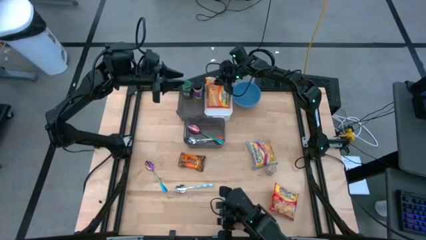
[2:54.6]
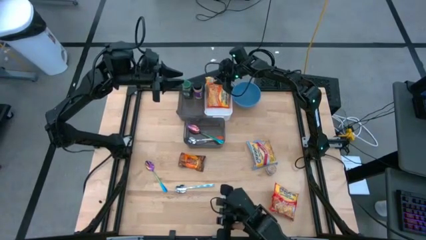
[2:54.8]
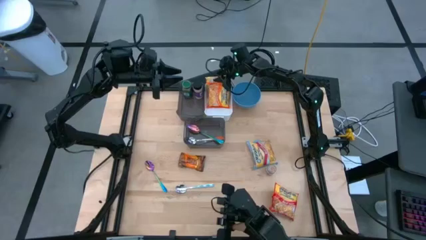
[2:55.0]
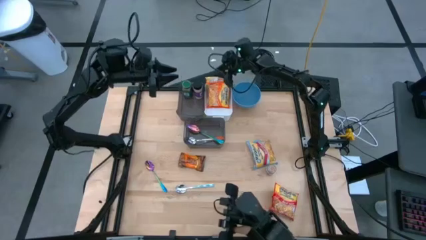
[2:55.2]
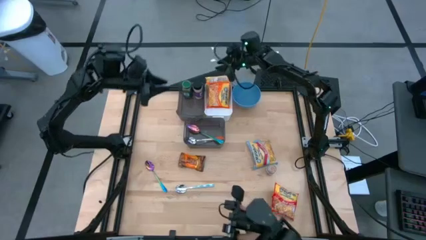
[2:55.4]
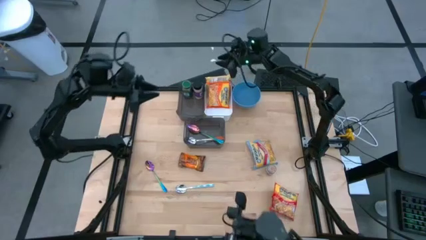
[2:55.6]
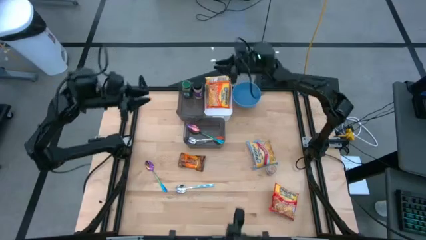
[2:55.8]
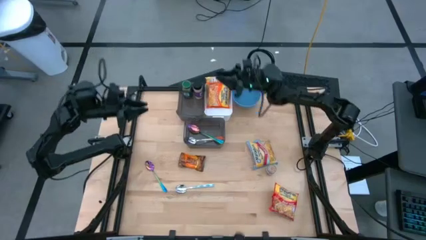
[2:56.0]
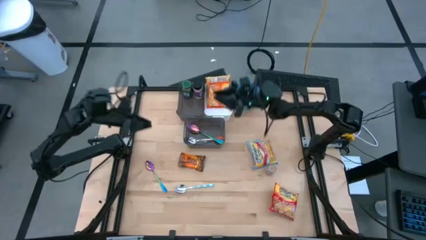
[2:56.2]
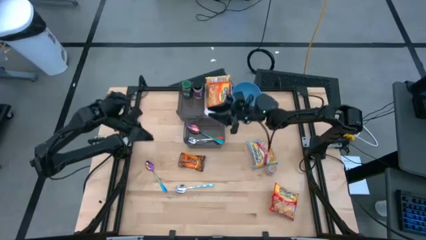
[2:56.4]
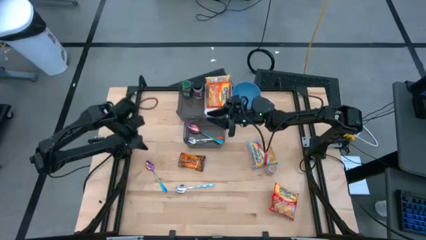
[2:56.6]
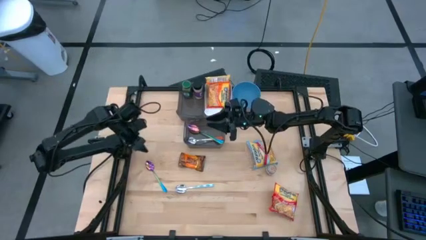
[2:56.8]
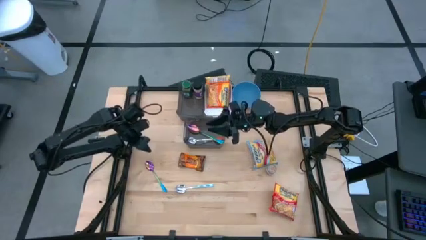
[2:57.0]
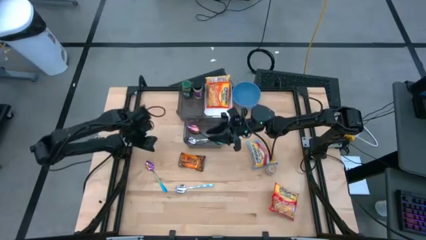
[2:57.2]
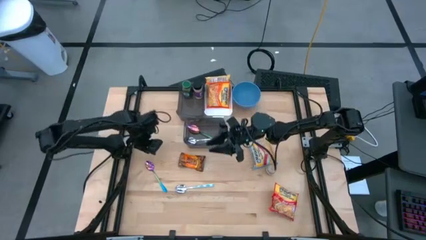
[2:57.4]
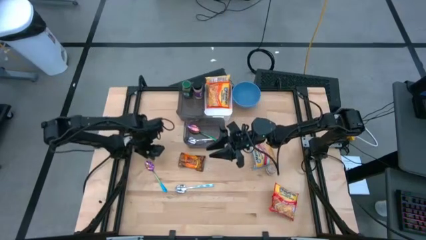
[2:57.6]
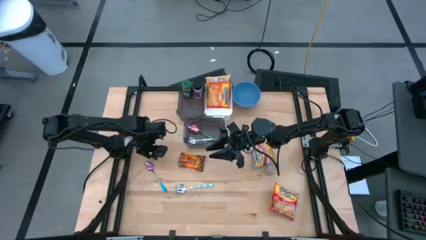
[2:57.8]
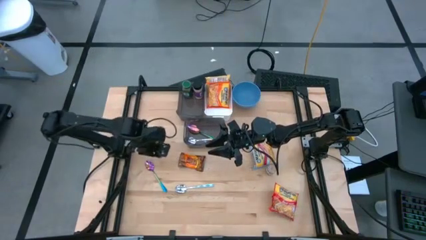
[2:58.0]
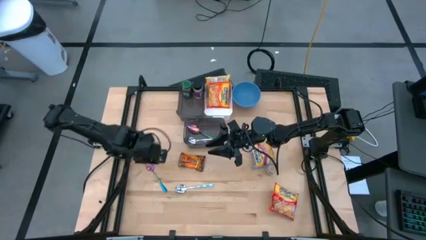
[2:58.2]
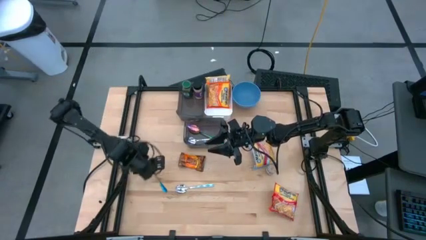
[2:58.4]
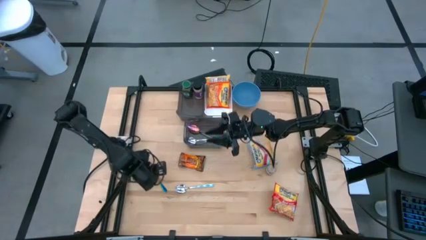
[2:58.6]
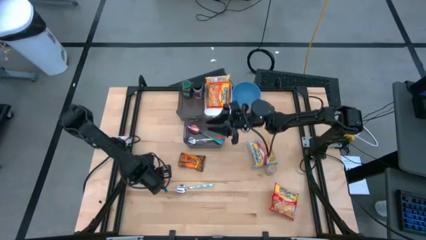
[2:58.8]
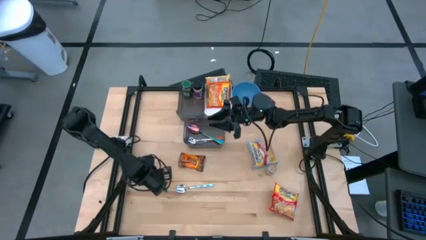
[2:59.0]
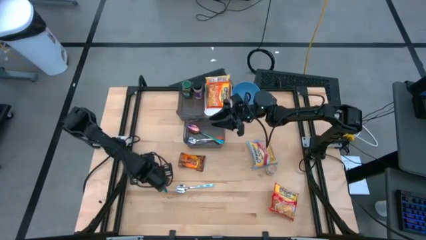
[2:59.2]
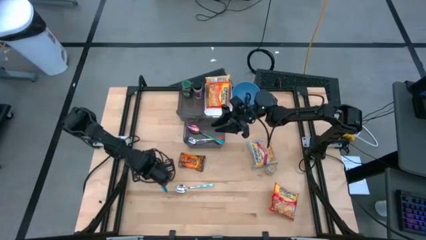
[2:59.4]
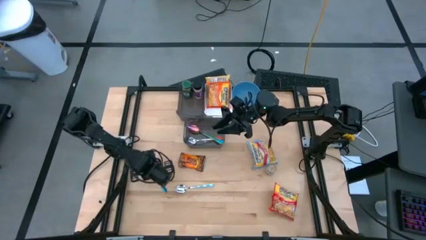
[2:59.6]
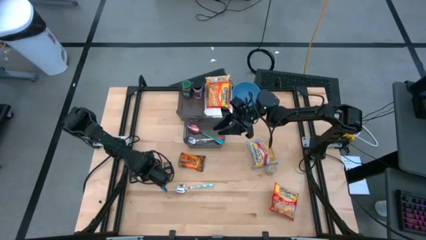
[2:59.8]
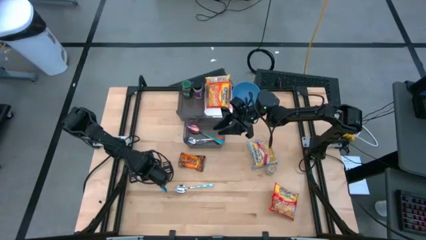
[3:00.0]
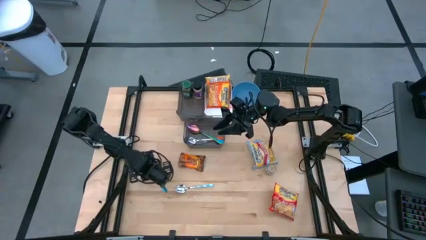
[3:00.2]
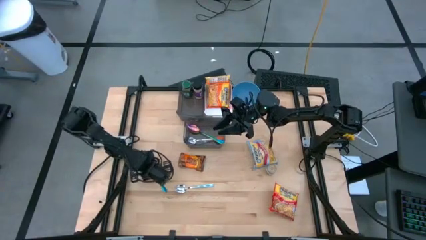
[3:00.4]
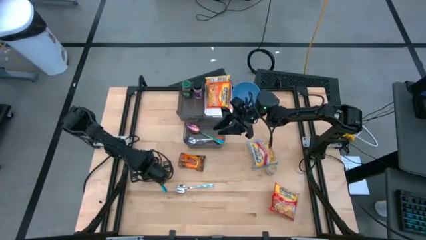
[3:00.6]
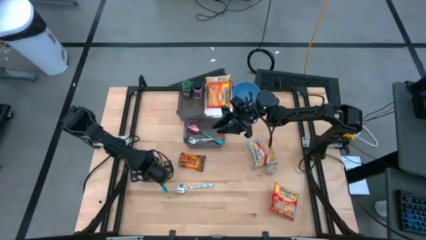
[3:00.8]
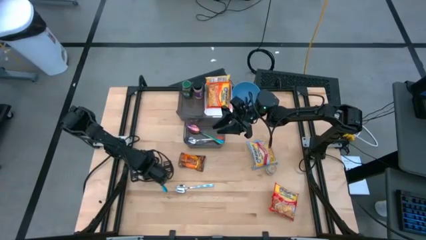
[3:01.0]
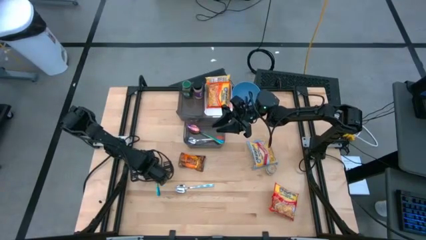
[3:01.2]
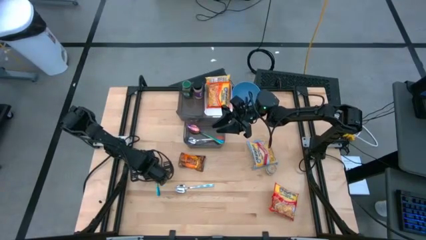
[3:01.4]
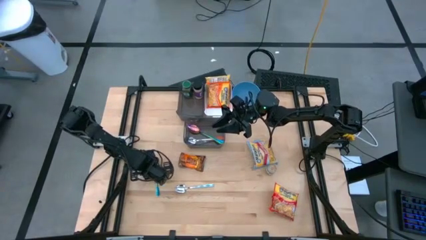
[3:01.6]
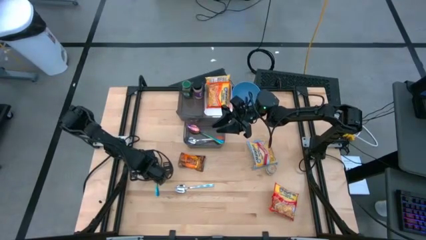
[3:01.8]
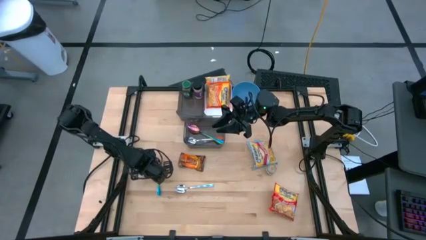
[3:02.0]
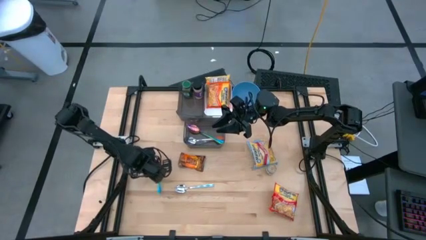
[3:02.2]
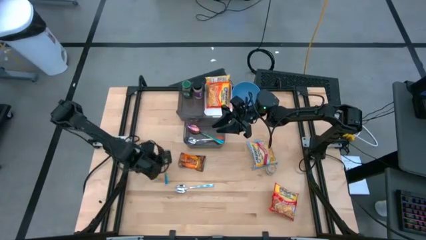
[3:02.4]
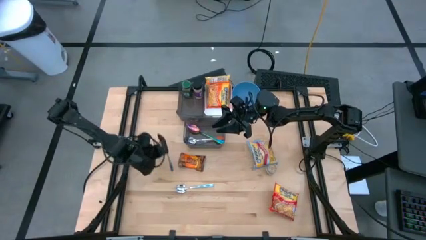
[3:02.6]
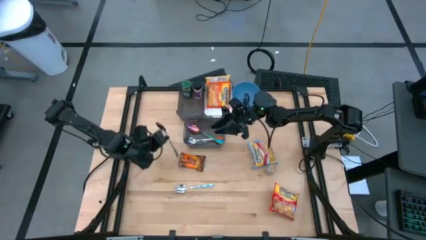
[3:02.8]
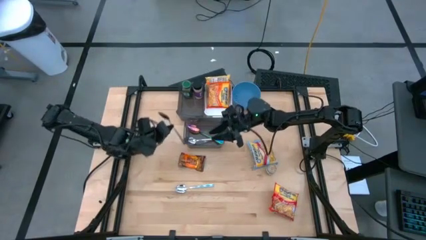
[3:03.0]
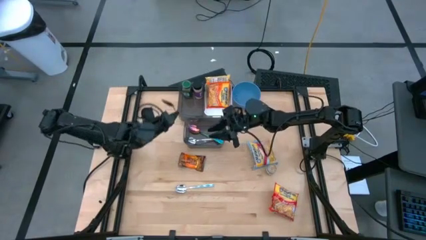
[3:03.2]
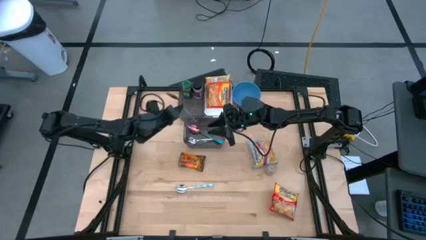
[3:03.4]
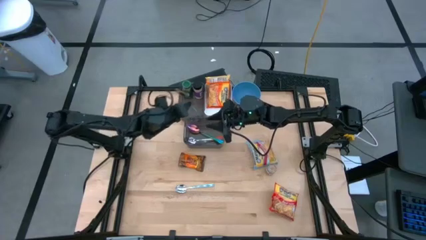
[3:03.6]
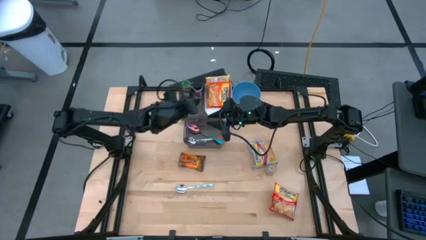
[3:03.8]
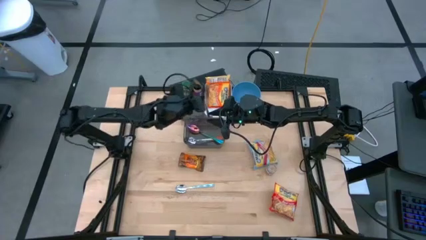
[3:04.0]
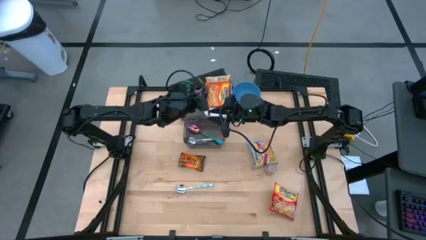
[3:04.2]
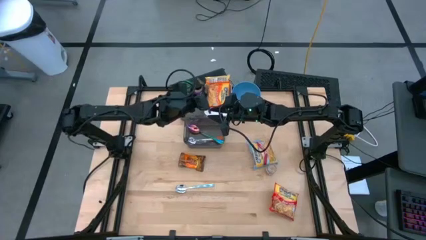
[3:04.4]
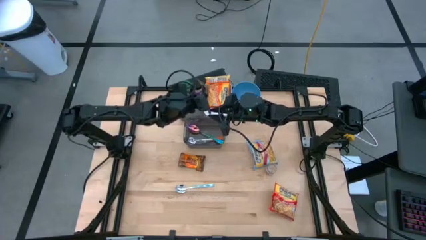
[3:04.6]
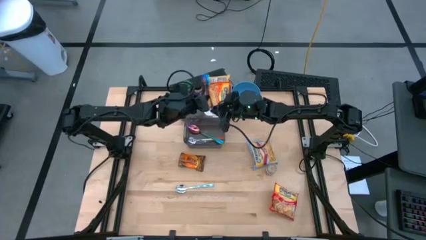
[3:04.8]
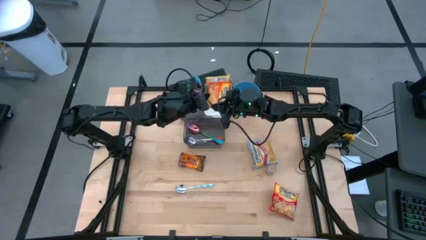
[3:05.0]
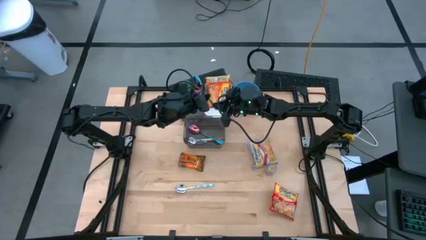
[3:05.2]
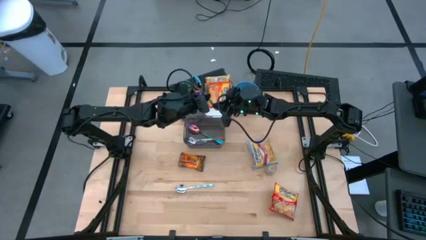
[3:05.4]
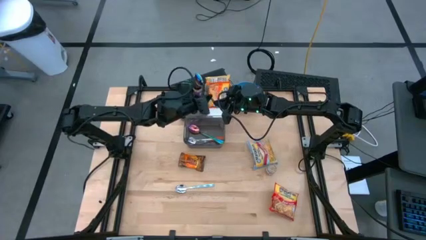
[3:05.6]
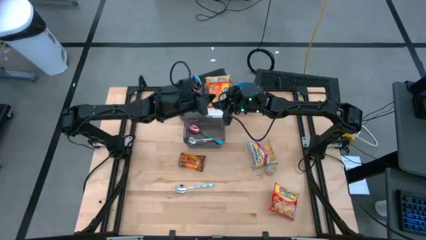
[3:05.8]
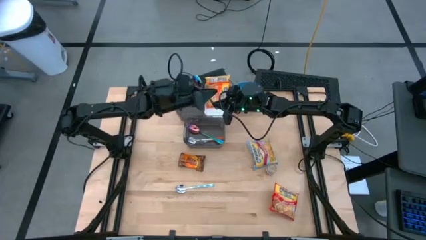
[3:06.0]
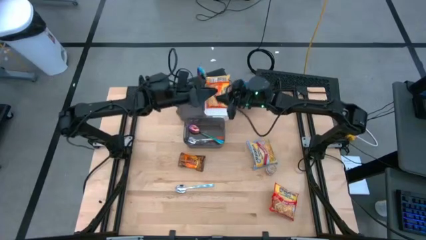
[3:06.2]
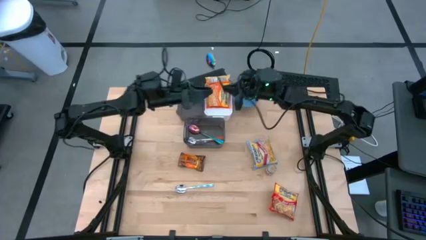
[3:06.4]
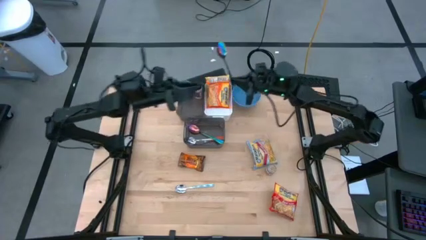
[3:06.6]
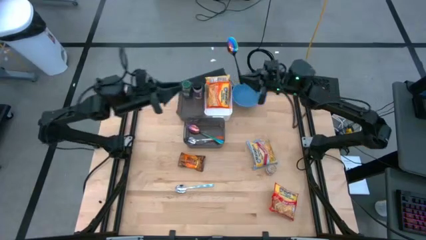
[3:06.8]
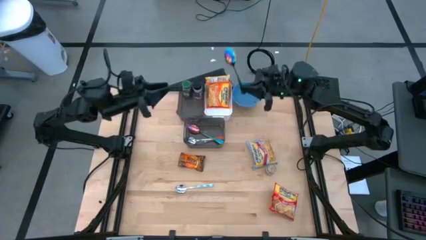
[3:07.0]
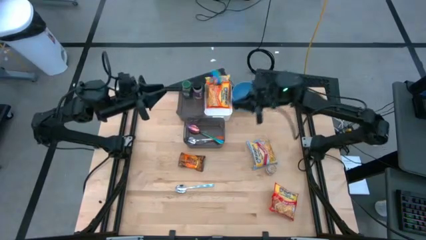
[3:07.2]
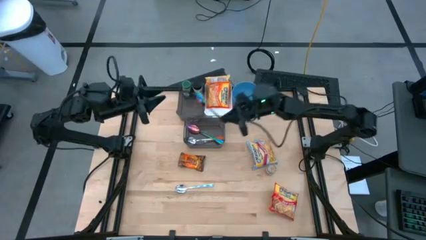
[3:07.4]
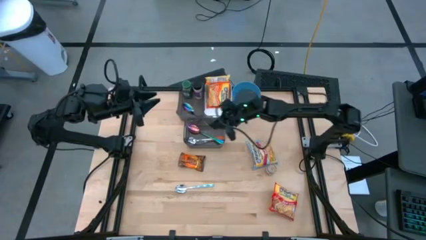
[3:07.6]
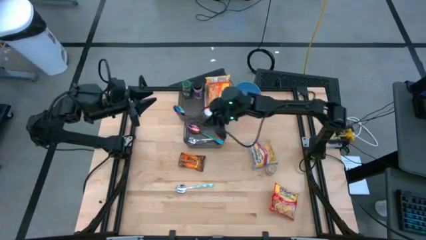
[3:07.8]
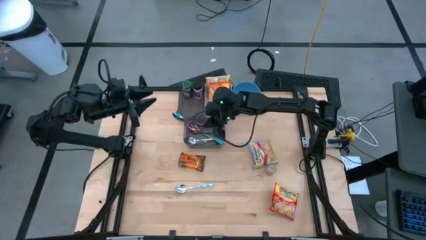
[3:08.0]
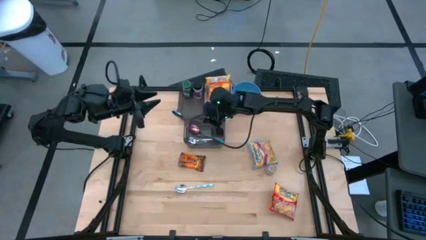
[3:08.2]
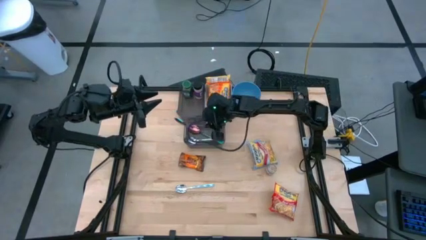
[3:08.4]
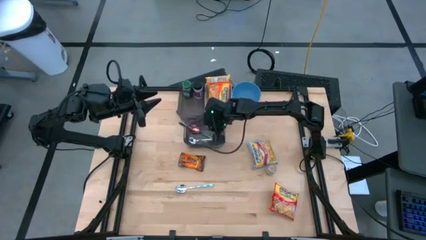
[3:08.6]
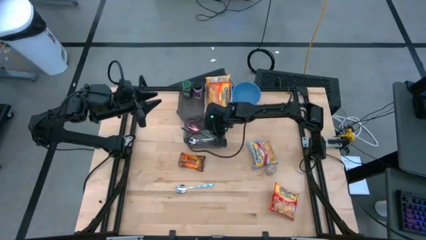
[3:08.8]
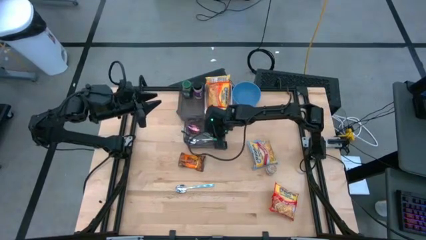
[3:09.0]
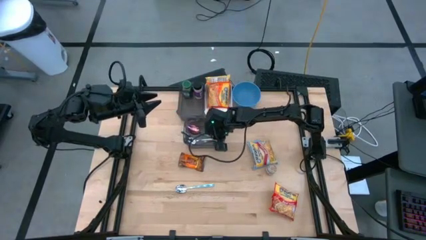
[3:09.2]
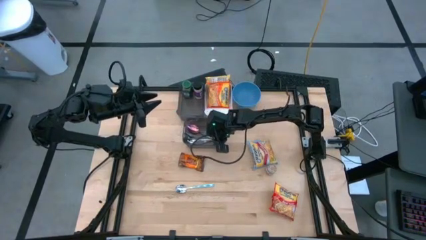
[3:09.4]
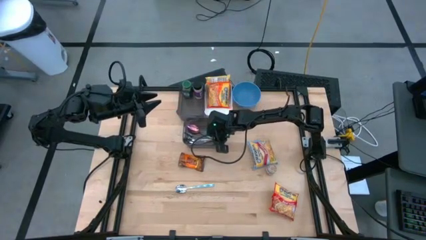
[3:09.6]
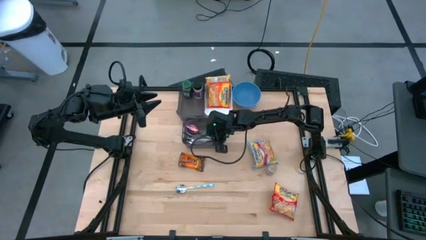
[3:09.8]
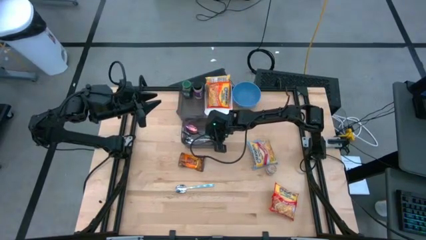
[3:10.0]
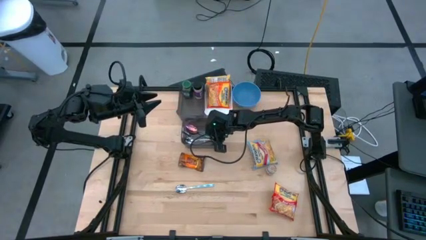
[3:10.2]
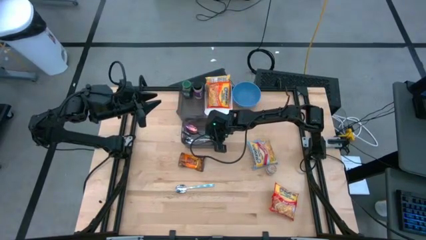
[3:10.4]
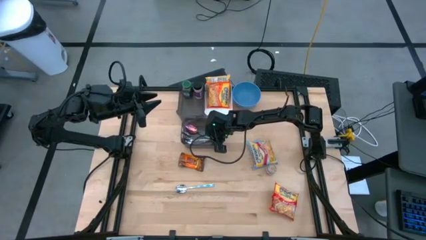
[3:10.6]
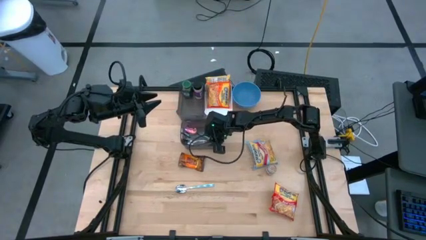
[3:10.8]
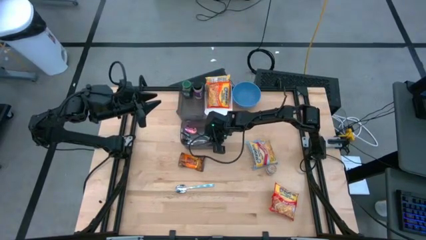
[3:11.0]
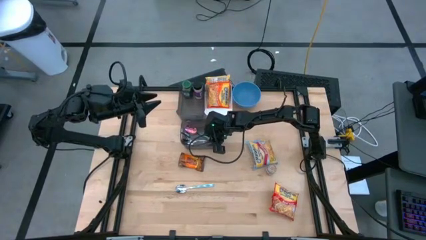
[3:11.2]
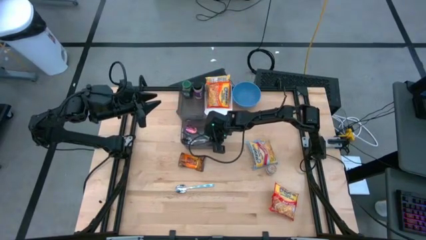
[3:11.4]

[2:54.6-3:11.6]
Task: Pick & Place Food Item
Put the blue spoon into the bottom black bin
